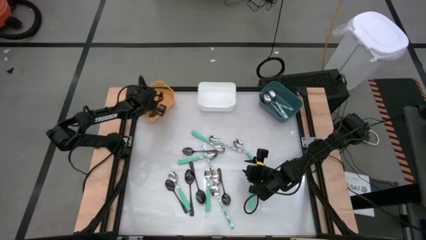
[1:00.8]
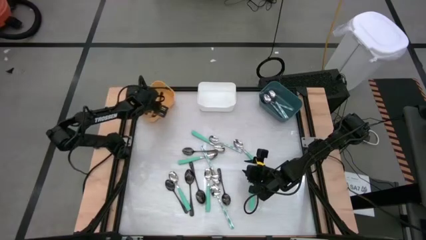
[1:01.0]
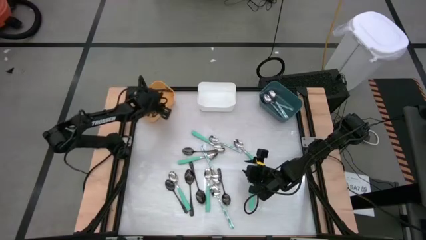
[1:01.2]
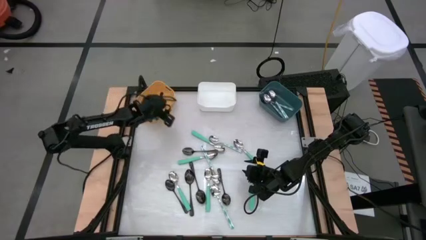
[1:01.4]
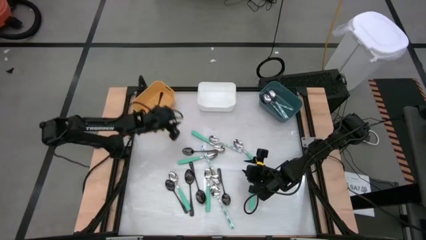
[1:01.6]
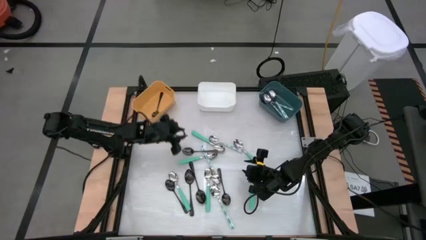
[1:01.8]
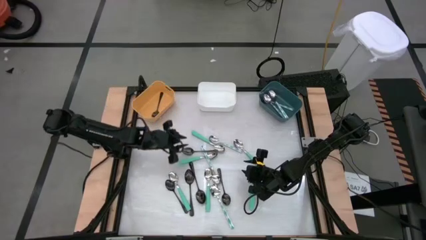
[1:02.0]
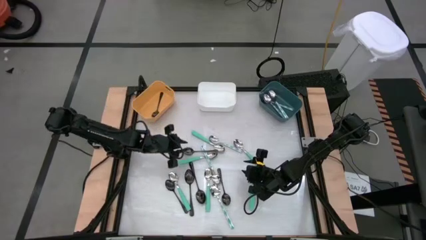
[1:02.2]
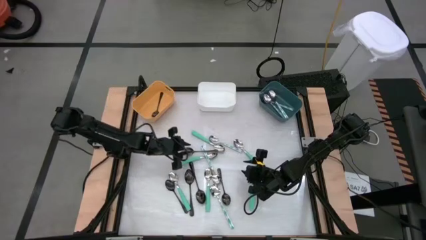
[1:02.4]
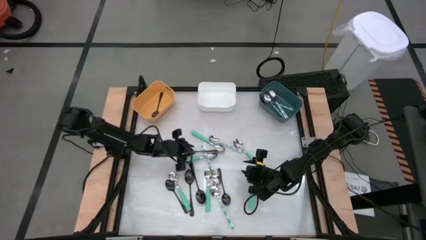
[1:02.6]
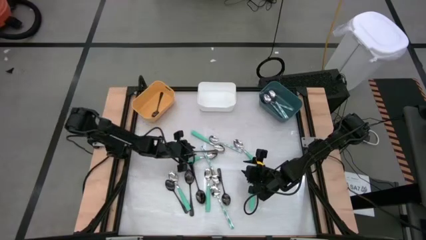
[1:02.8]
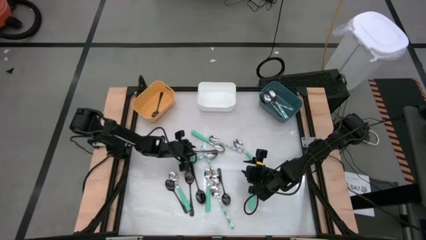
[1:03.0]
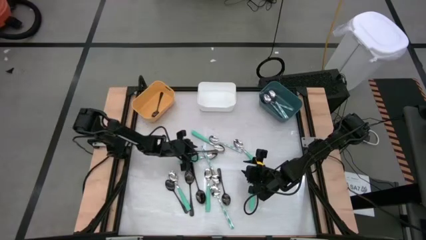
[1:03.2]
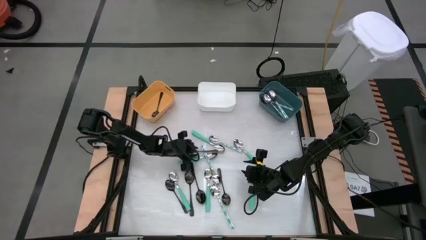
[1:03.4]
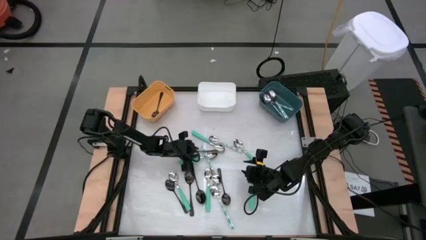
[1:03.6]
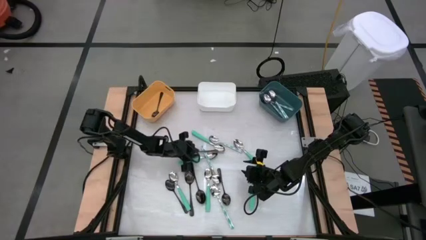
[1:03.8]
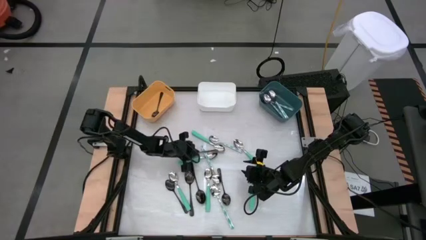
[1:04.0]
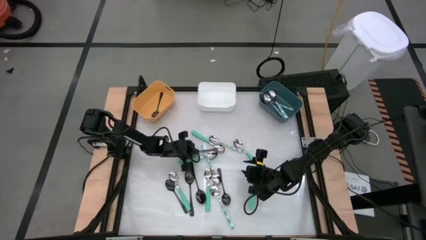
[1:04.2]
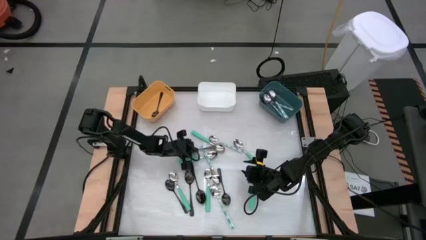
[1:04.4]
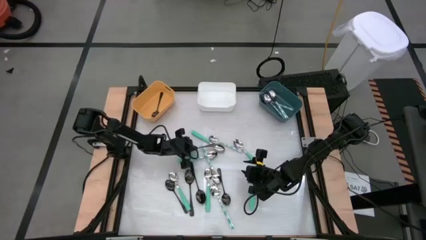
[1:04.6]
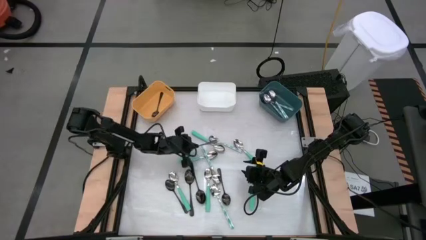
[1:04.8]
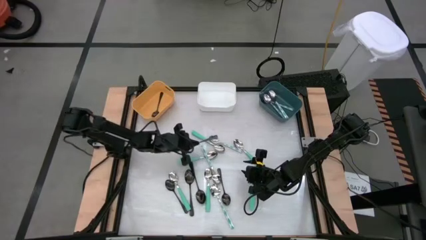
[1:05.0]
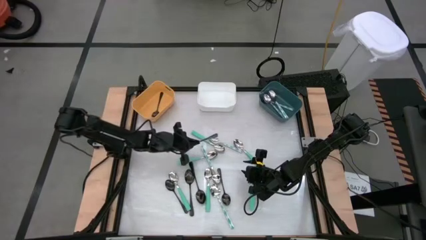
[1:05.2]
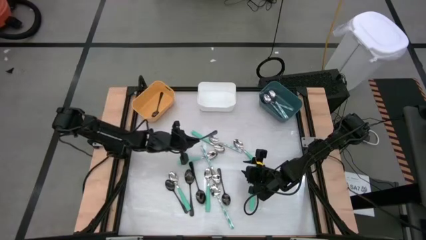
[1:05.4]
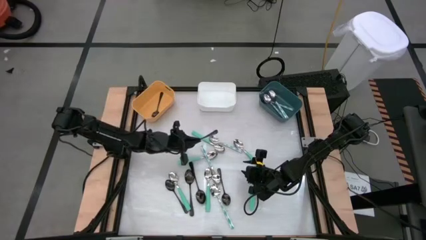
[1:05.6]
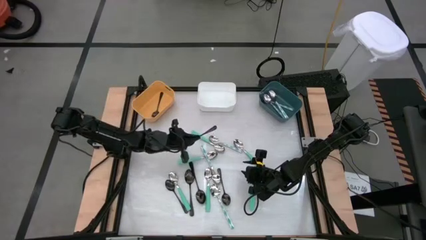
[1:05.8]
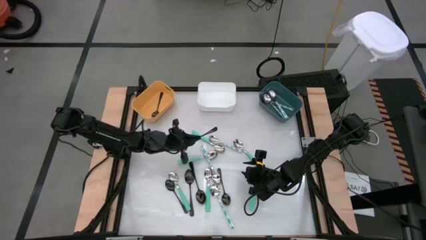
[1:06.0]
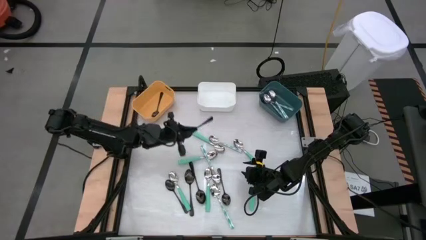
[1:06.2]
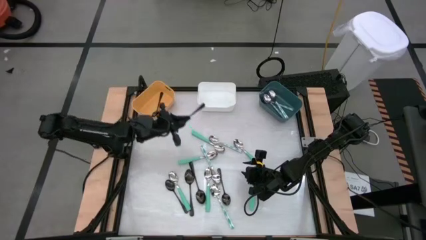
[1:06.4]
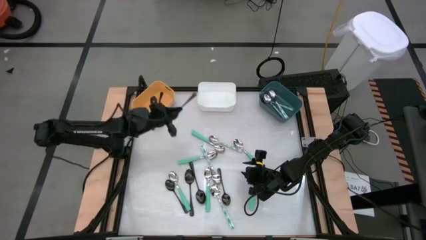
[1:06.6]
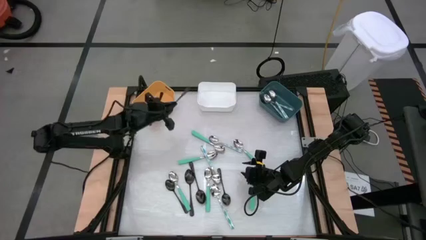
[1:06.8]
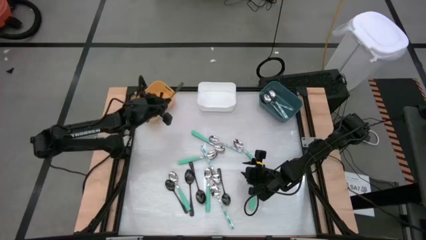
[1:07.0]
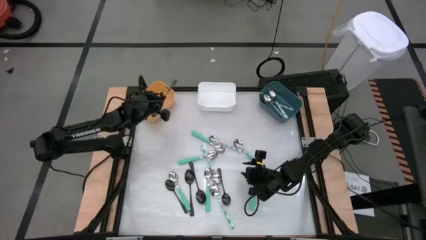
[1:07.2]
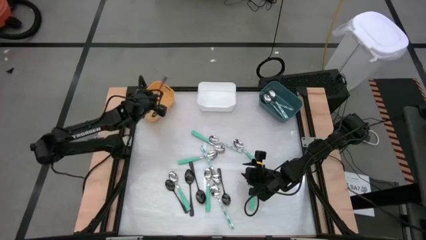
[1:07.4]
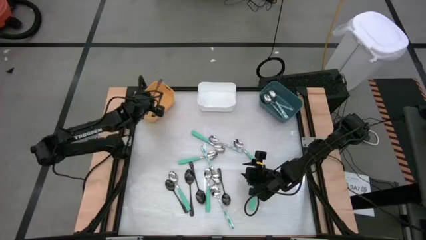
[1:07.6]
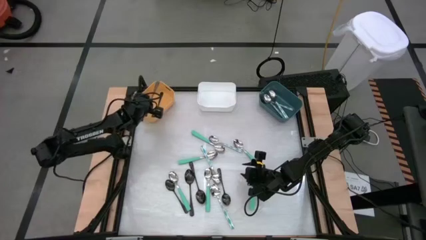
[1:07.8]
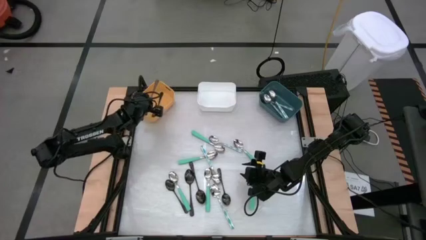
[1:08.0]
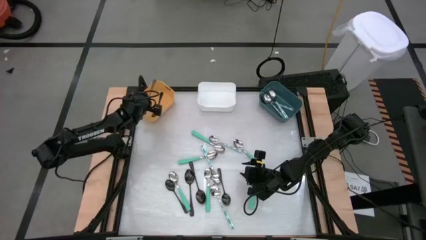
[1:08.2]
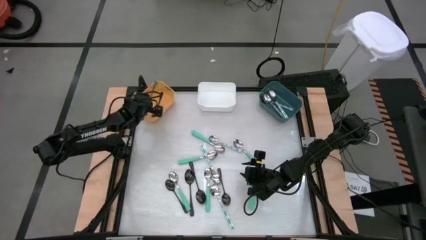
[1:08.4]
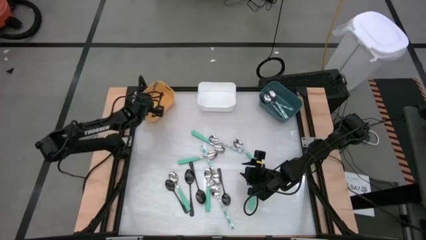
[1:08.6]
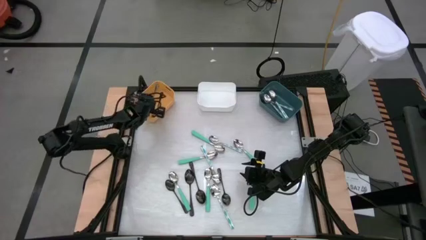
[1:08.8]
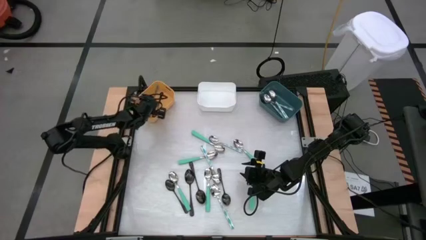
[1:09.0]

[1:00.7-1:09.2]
Task: Sort silverware by color (type)
Put the black spoon into the orange bin

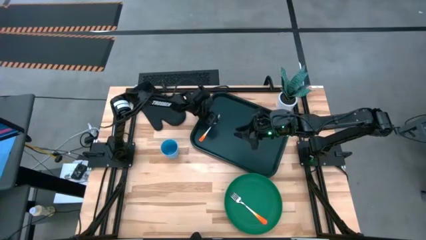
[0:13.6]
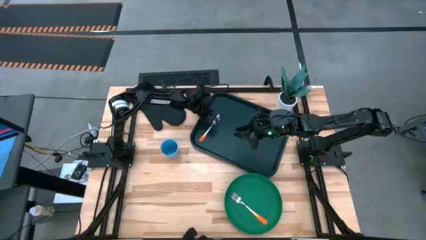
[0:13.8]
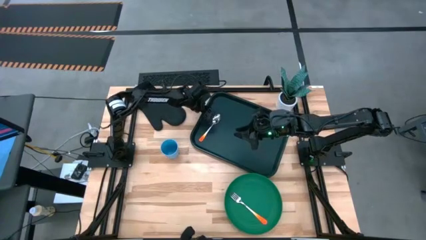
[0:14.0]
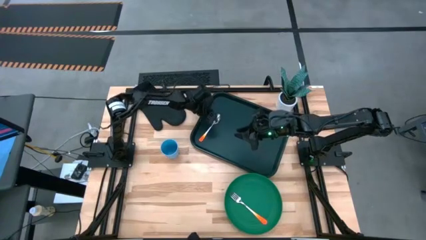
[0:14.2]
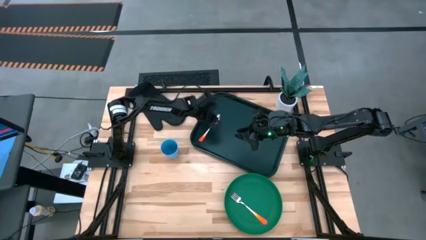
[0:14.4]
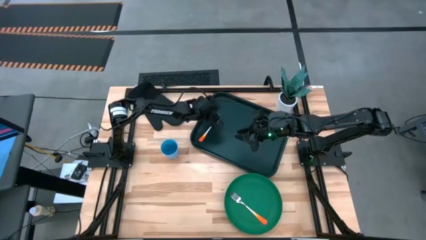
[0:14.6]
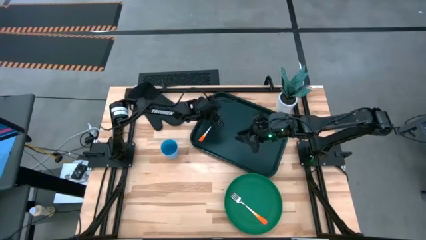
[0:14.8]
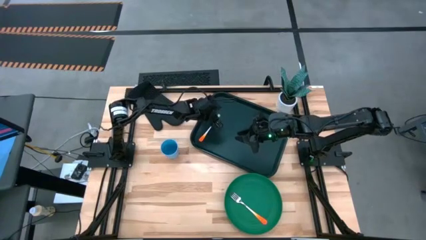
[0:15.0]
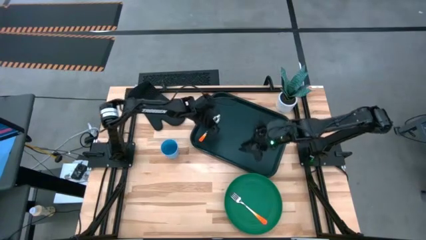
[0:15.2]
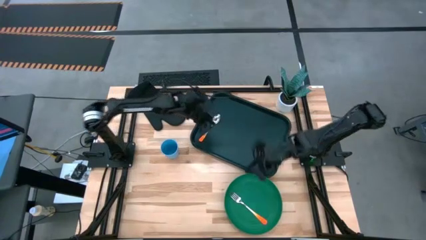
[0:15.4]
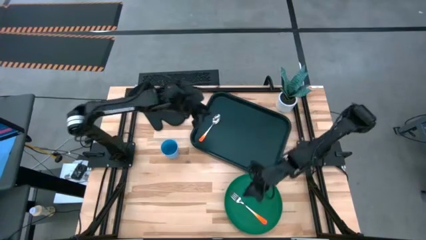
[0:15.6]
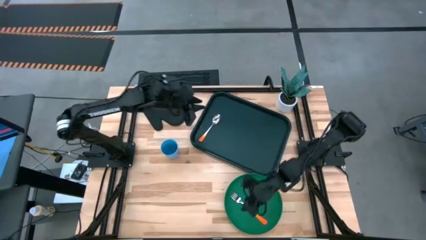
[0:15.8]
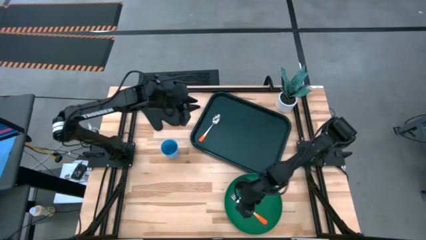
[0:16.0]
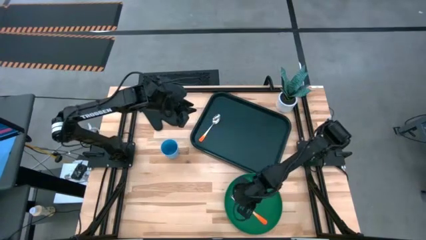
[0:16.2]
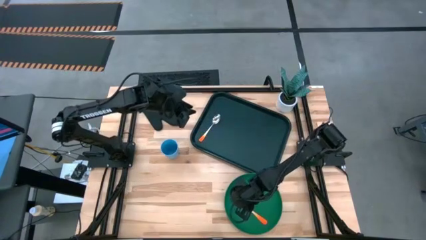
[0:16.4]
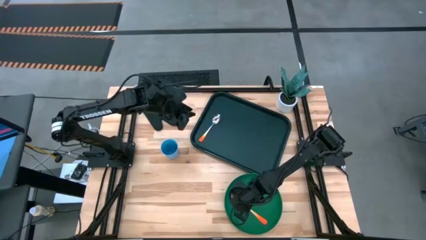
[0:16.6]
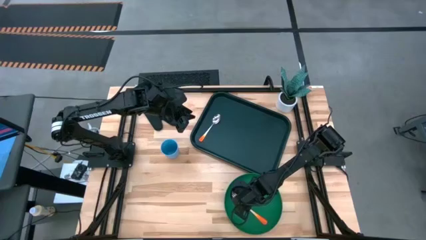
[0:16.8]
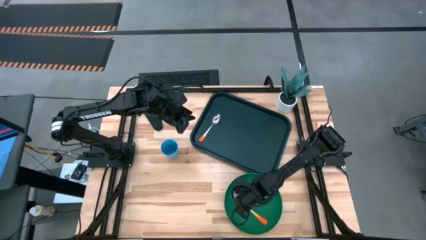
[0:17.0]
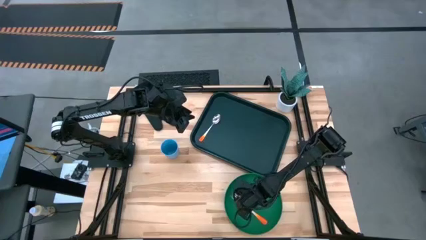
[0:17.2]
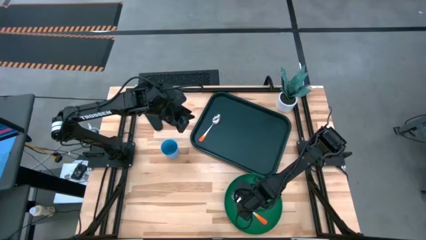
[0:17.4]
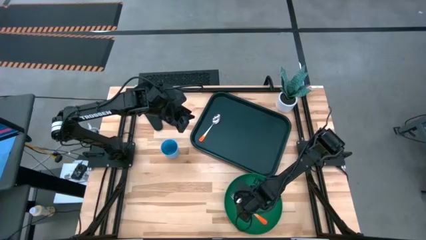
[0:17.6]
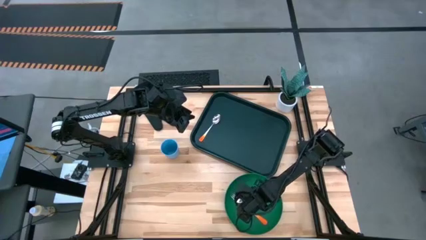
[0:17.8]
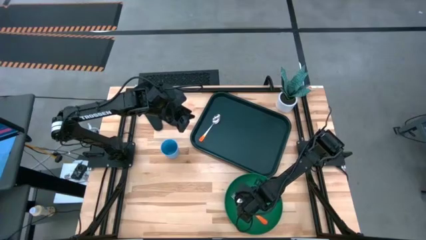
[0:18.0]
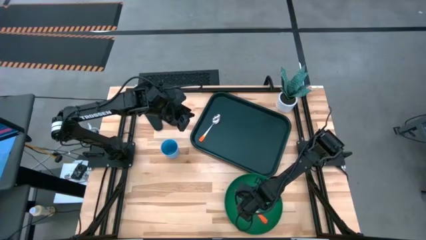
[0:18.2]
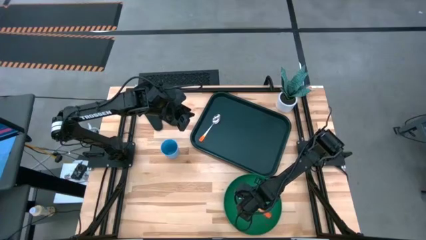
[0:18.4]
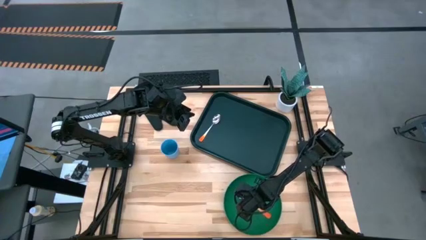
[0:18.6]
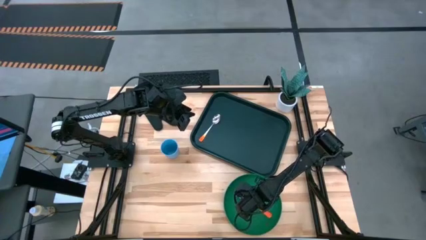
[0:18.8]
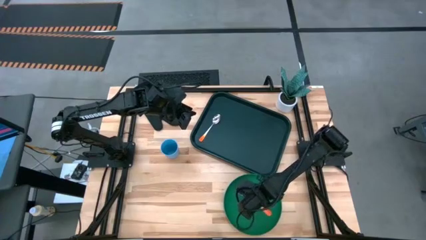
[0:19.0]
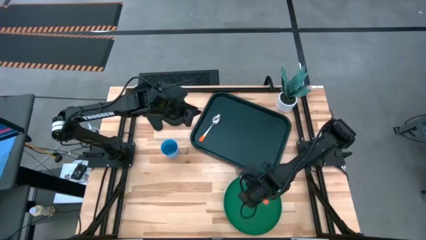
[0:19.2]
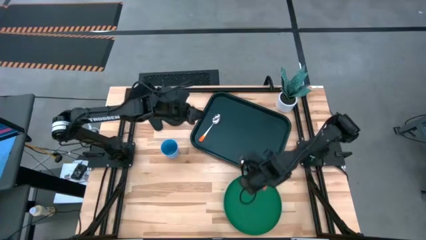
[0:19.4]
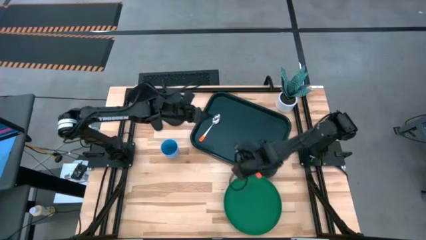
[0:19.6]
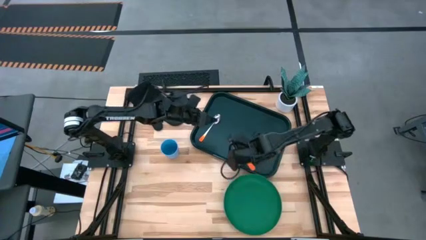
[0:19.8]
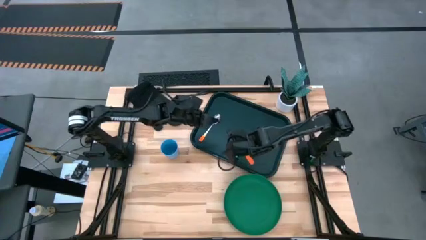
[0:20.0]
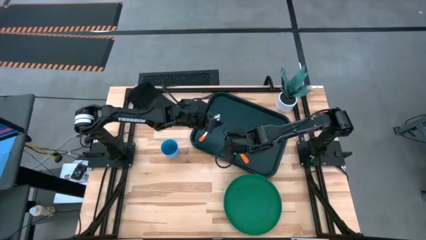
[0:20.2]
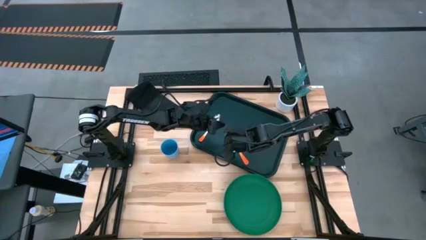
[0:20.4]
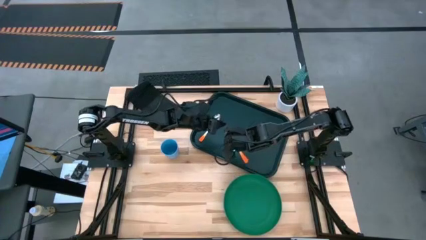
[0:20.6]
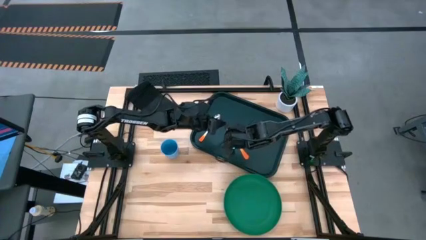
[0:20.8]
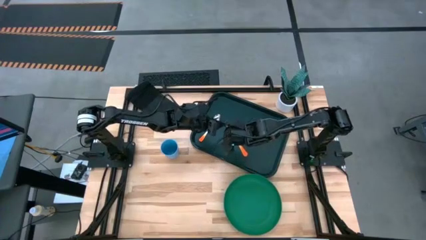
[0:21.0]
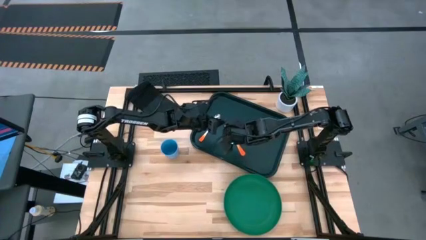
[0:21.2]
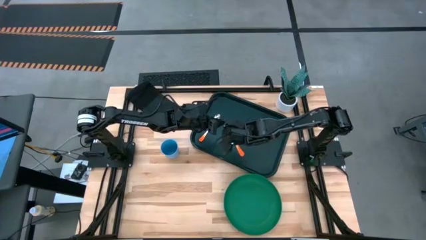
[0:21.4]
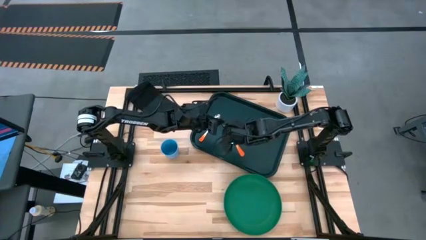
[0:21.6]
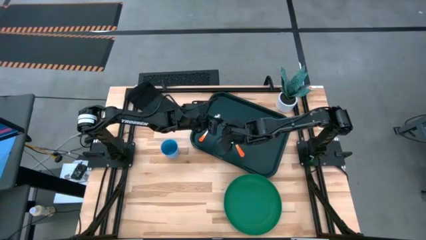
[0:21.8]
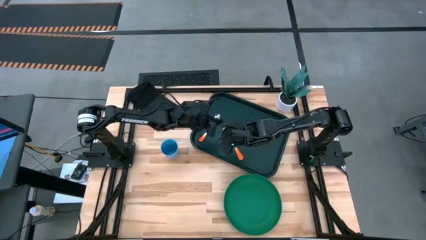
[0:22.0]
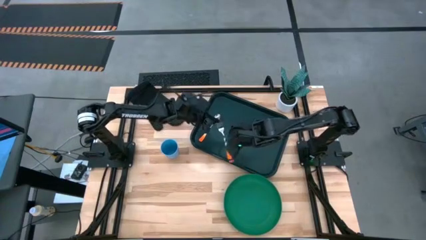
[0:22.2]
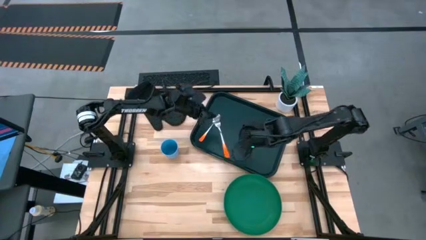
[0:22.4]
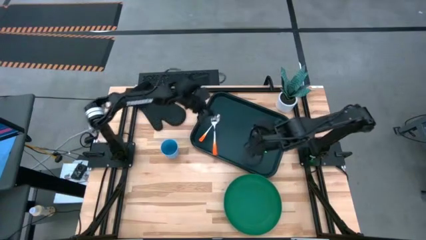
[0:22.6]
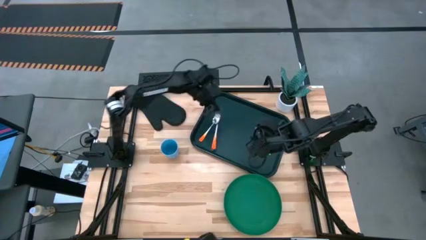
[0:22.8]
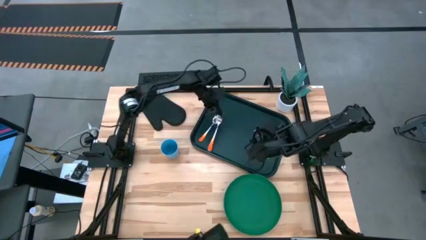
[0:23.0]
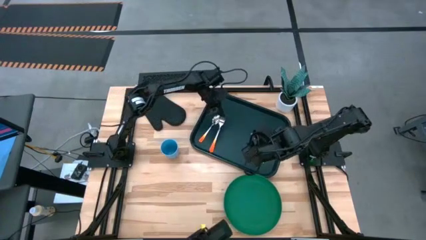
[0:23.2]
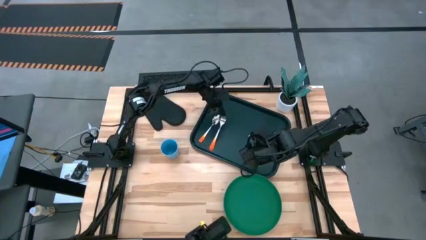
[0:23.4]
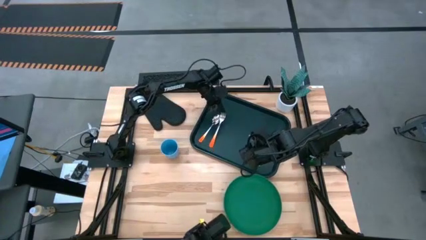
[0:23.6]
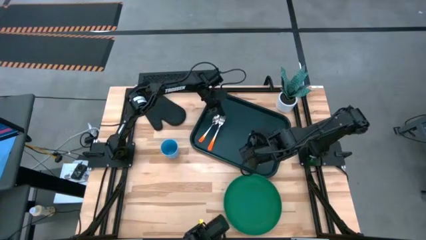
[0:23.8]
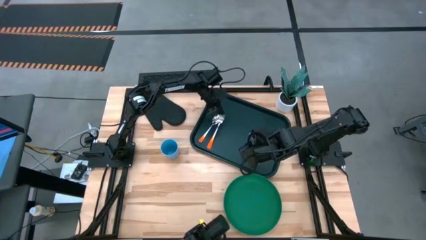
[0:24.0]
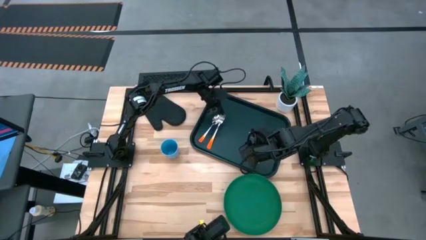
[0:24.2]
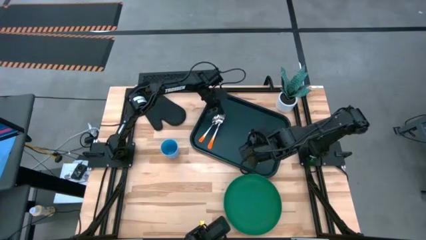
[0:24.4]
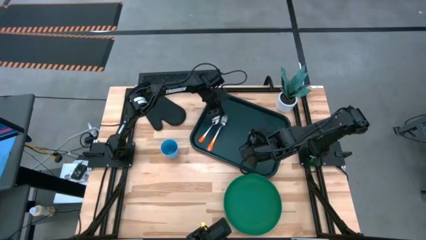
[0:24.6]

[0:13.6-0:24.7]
Task: Pick and place plate/cup/fork/spoon on tray
Put the orange fork on the right side of the spoon on the black serving tray
